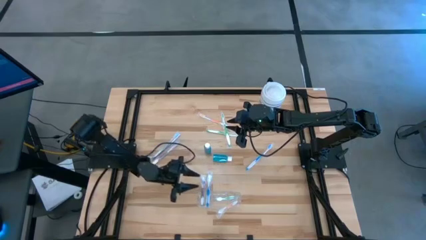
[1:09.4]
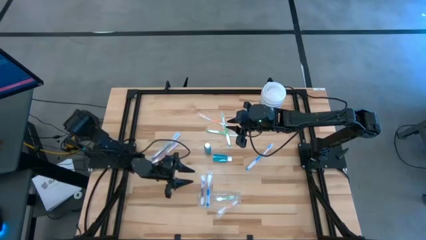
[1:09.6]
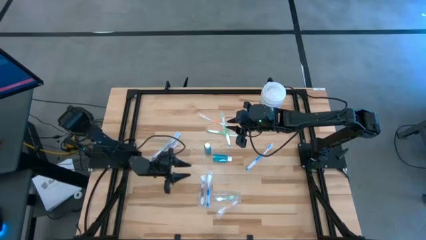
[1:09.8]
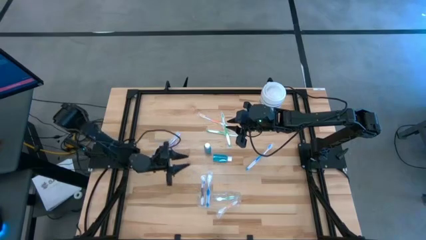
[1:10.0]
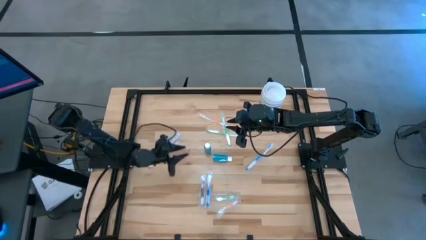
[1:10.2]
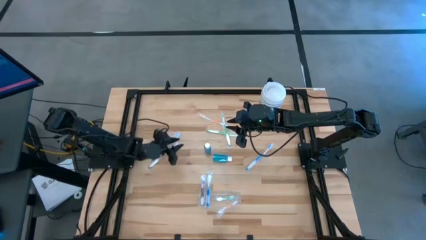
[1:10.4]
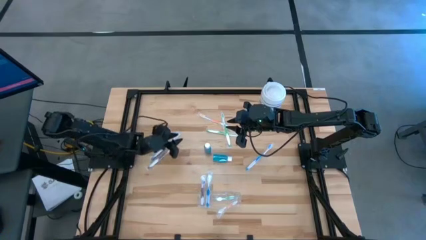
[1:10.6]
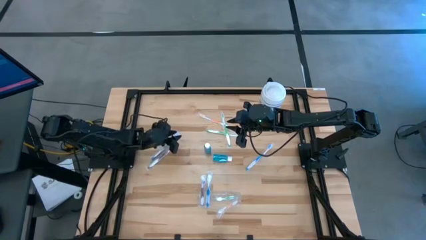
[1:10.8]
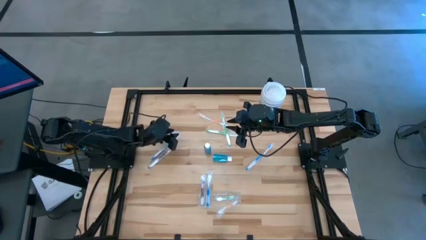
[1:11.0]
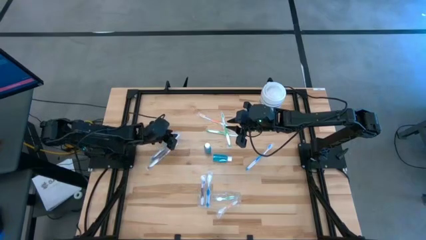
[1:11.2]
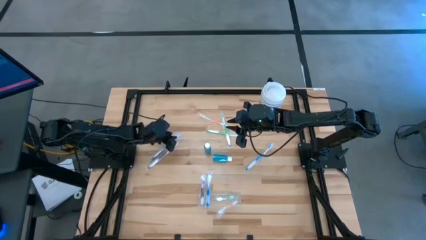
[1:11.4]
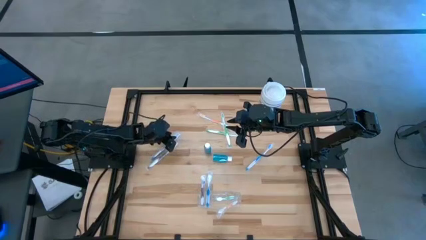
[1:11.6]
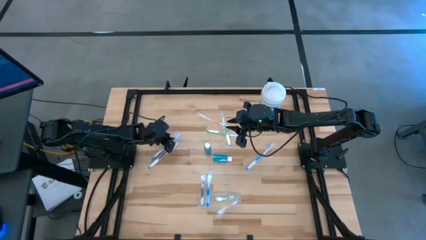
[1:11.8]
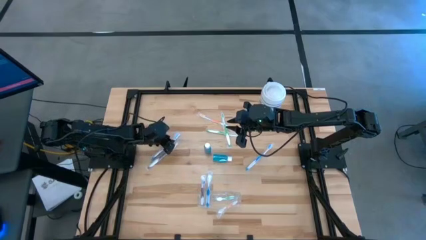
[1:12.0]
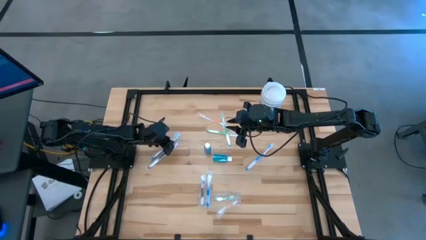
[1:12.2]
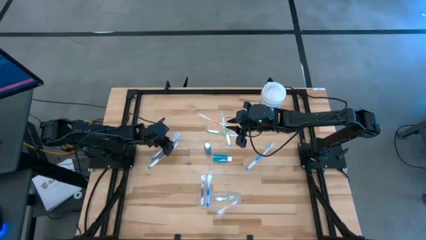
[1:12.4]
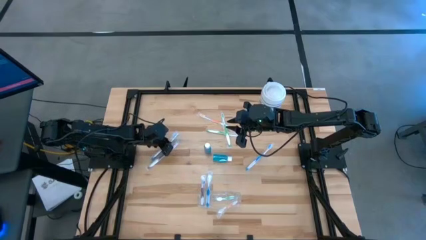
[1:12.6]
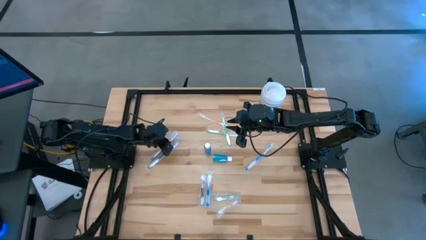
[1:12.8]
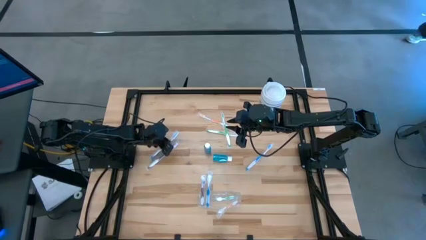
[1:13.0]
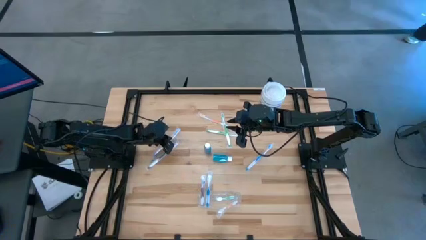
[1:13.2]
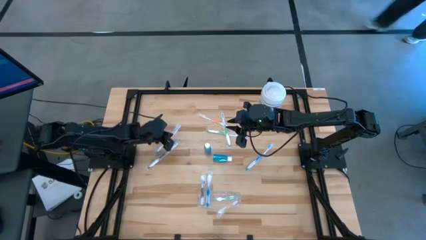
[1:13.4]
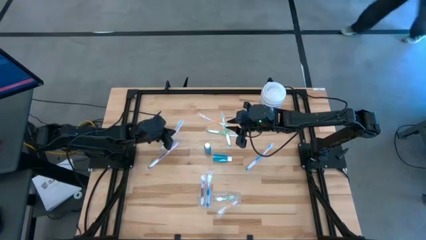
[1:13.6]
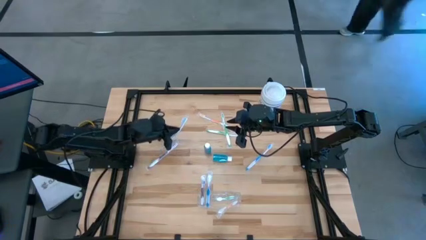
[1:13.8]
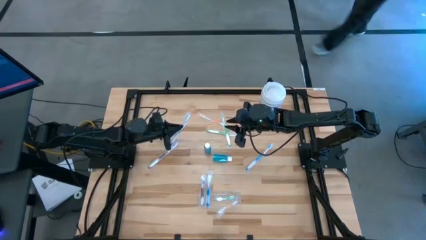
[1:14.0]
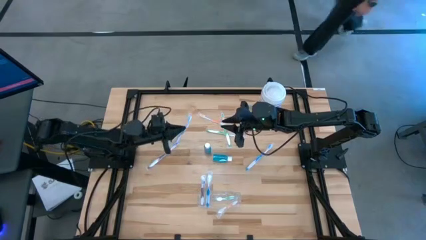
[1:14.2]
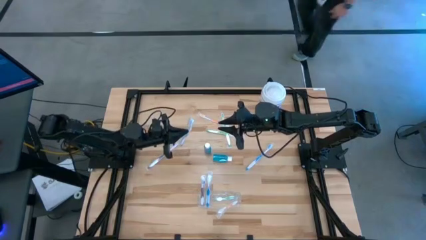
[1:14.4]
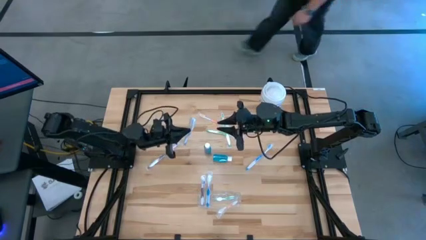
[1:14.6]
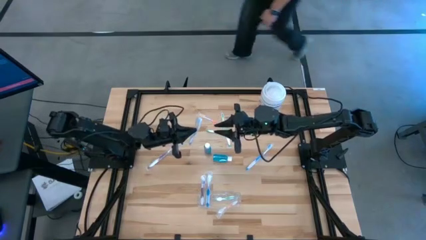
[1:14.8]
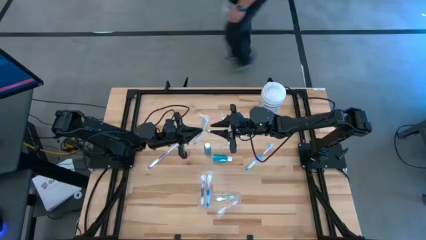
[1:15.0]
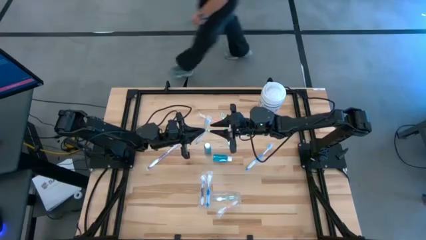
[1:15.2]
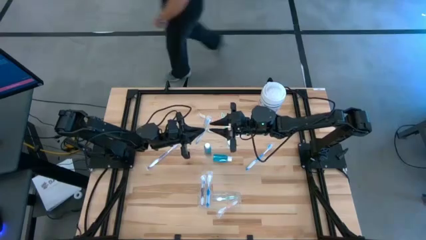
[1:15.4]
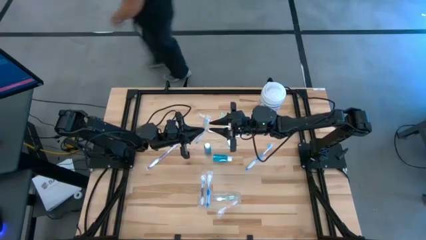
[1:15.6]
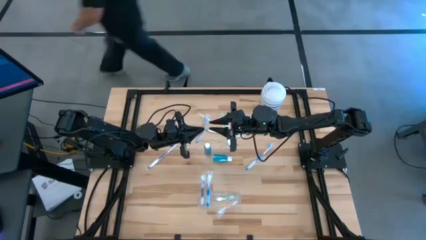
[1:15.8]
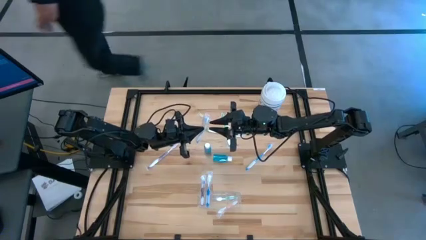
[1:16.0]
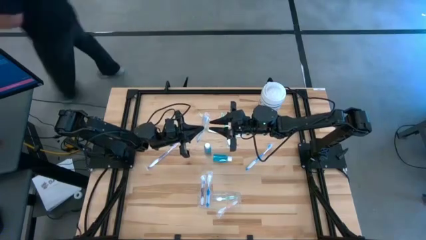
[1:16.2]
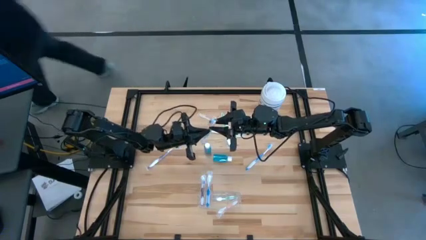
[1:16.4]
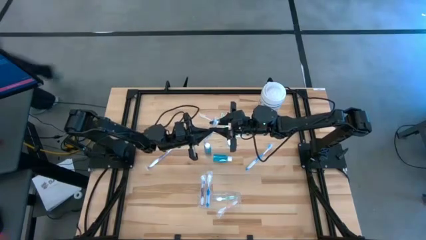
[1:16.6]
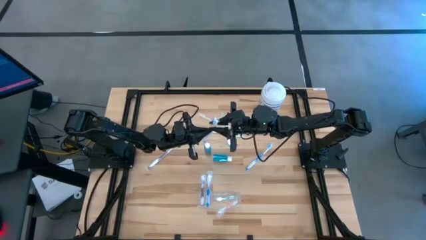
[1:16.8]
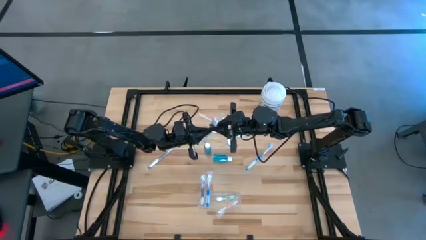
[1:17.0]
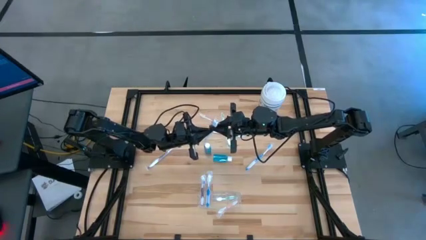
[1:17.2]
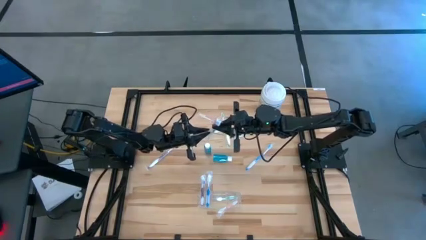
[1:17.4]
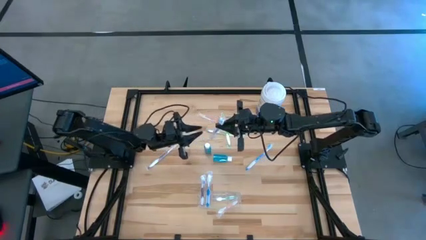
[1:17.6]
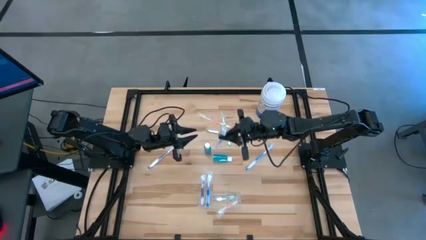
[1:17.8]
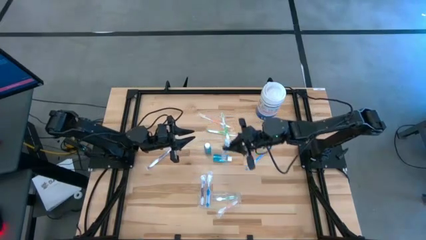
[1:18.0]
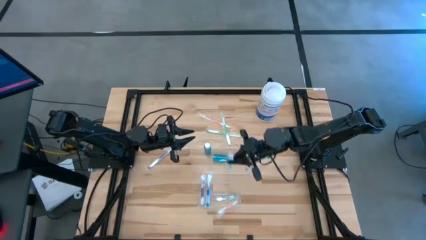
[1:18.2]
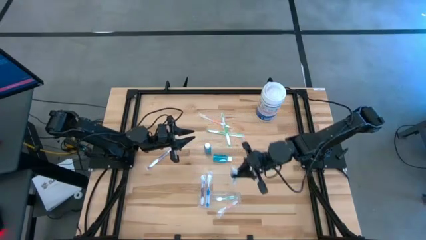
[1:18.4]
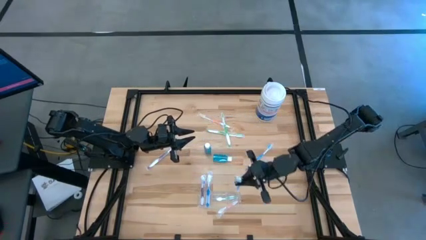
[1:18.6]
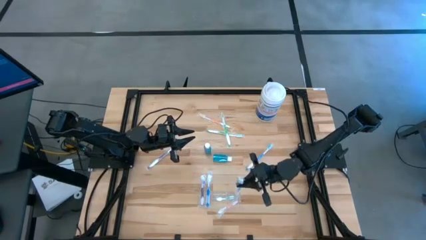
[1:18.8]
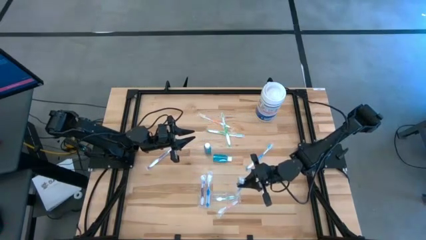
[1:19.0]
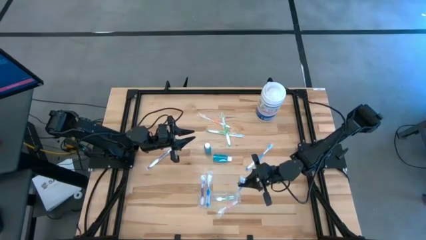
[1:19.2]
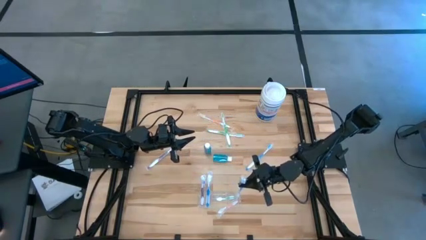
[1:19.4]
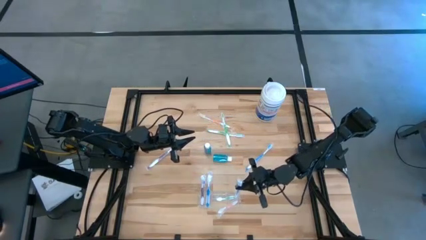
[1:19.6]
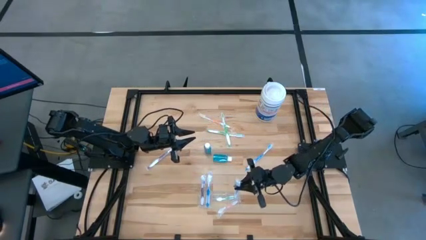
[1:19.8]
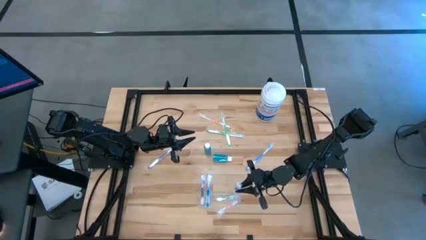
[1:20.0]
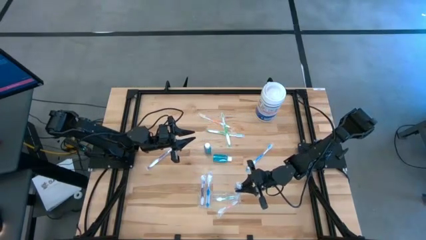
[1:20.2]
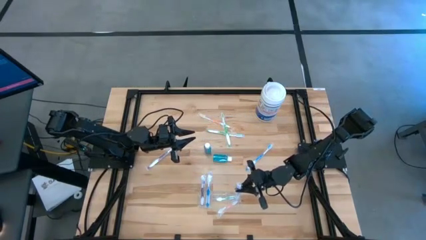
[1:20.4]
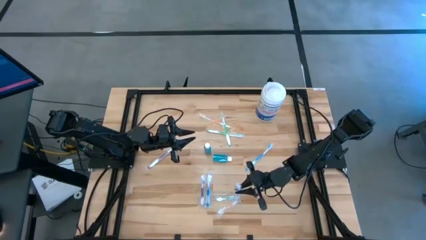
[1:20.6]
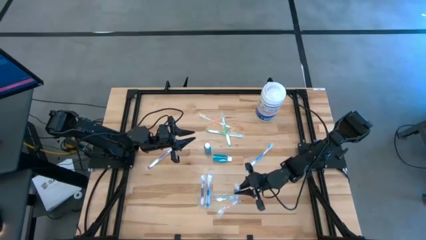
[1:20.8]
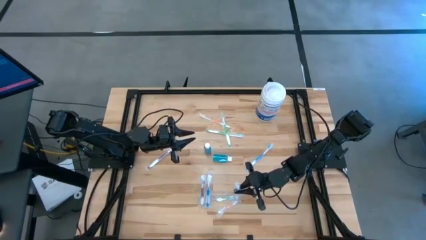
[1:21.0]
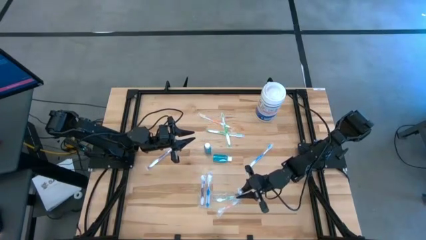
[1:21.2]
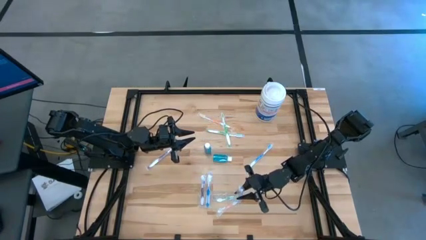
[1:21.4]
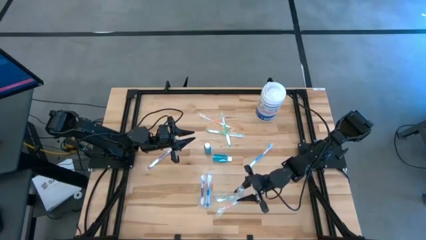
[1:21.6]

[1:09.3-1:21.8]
Task: Pick & Place toothbrushing station
Put the blue toothbrush into the transparent organizer

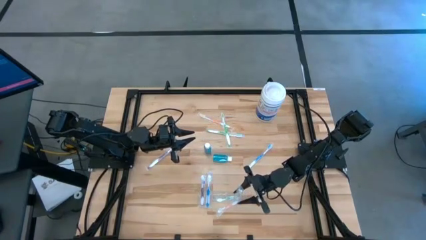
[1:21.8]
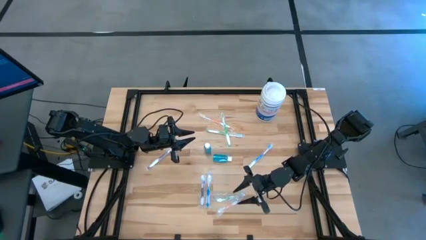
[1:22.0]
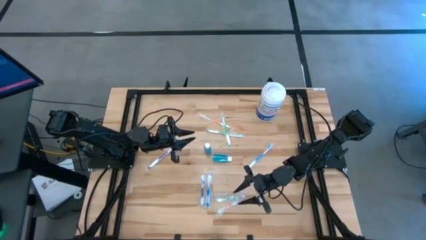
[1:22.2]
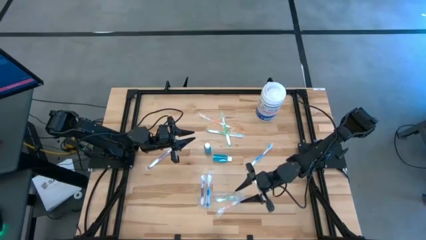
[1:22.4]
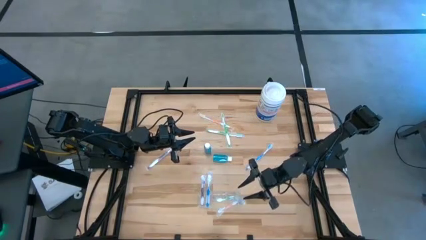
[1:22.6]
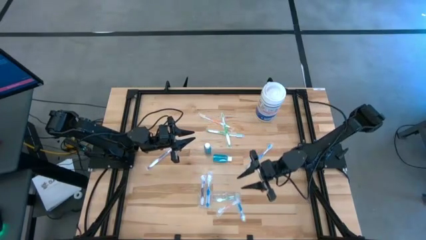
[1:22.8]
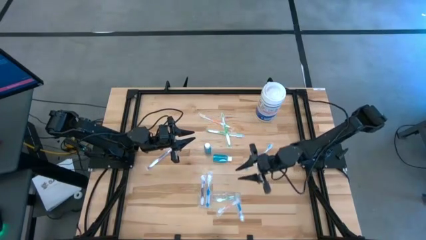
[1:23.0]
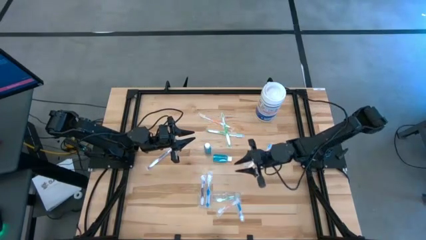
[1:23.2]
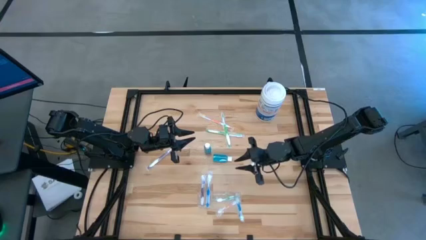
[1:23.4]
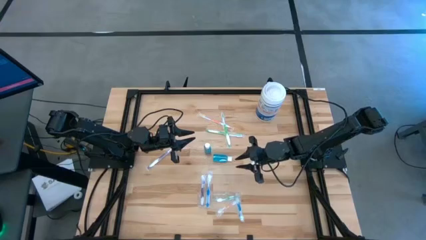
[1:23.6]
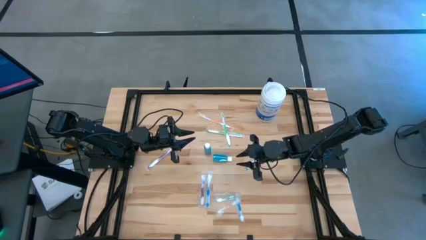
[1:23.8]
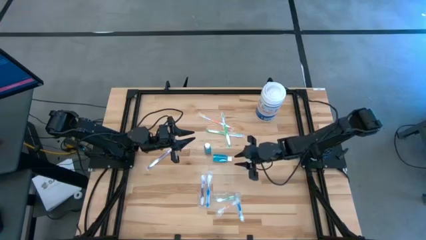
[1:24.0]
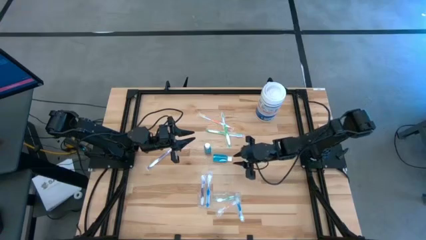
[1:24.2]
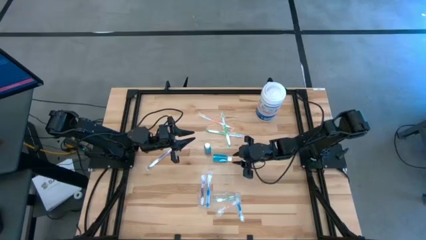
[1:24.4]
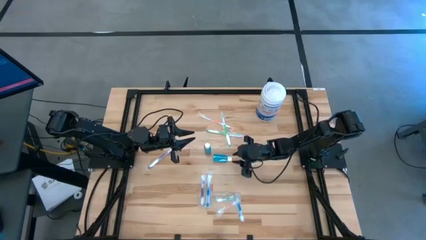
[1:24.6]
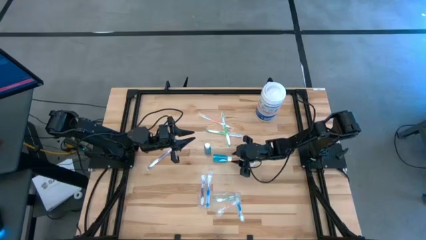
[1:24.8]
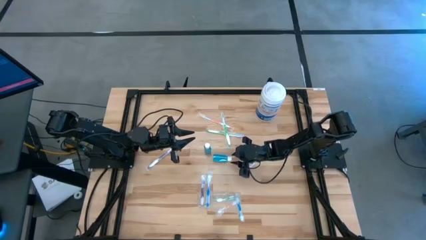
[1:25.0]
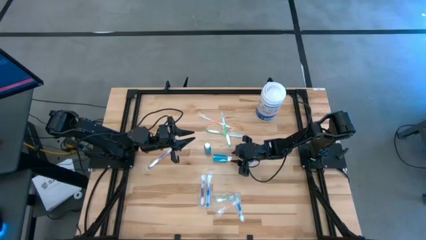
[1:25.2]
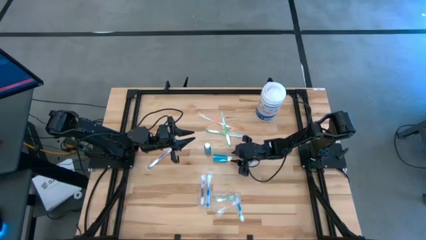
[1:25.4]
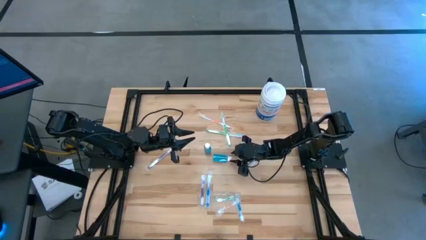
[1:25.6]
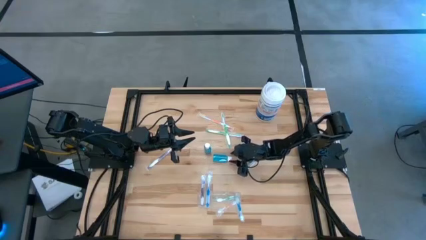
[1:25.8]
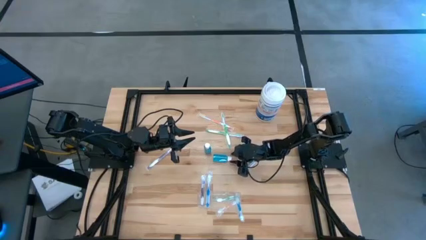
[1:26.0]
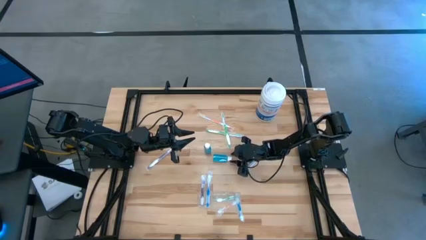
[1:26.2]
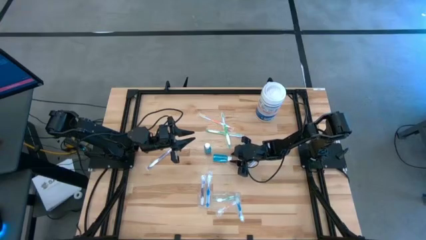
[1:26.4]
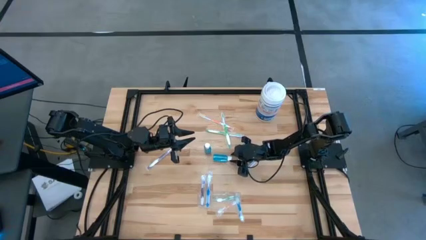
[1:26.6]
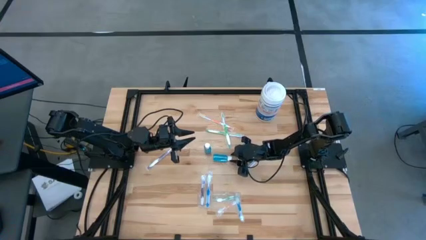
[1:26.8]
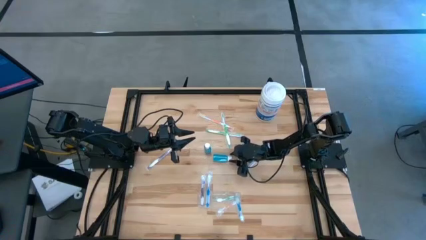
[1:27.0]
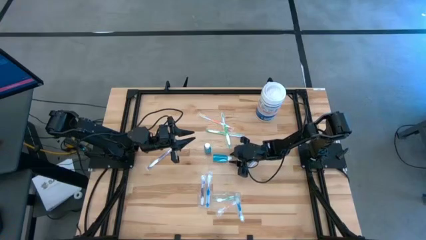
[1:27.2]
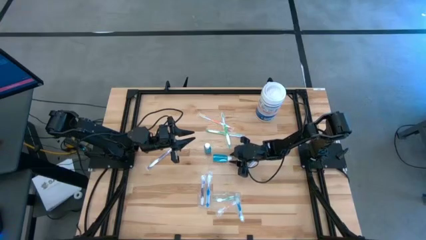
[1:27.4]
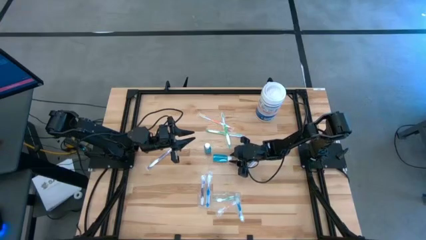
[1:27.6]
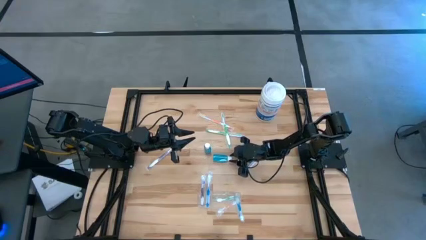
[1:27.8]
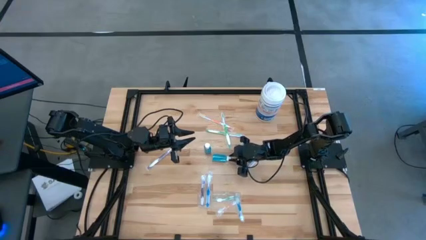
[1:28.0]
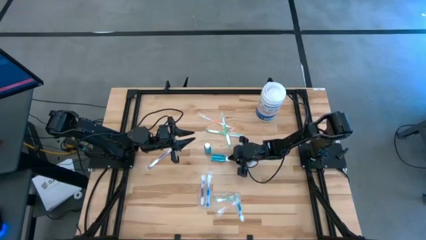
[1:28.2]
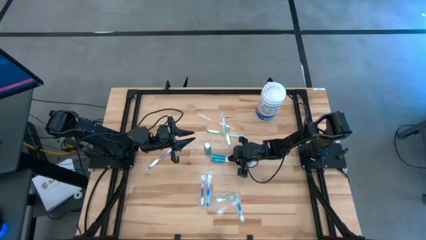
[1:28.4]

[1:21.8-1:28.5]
Put the blue mouthwash bottle into the transparent organizer
